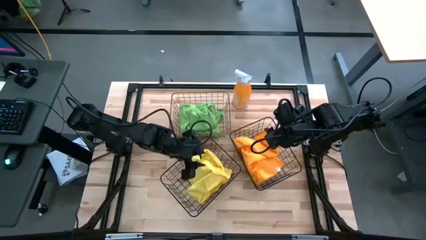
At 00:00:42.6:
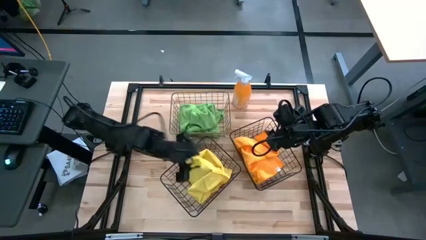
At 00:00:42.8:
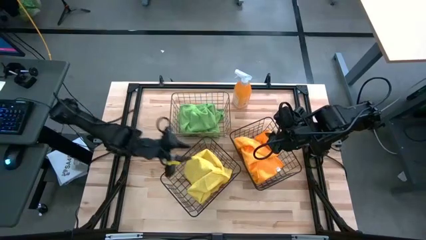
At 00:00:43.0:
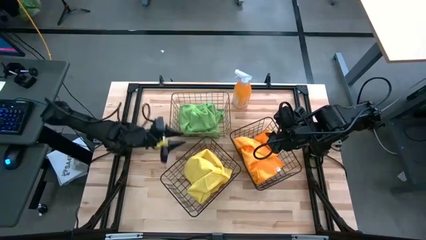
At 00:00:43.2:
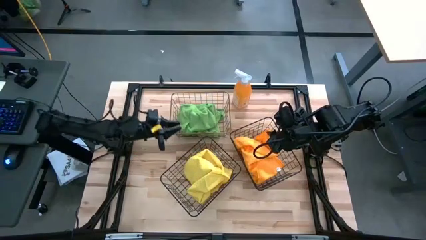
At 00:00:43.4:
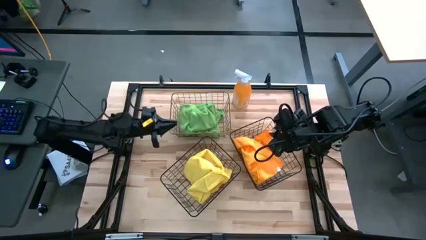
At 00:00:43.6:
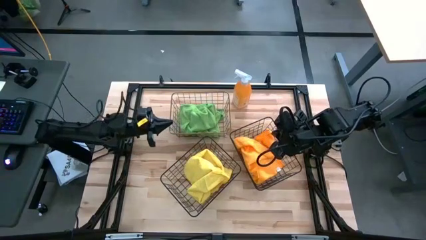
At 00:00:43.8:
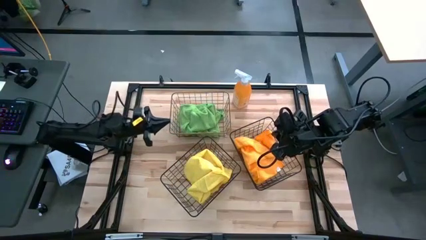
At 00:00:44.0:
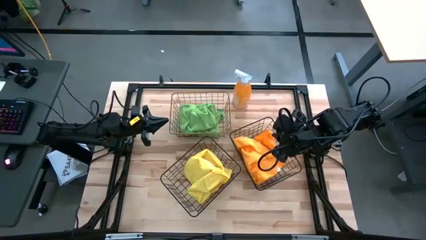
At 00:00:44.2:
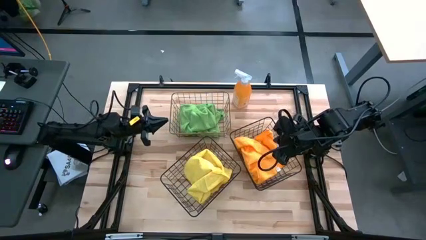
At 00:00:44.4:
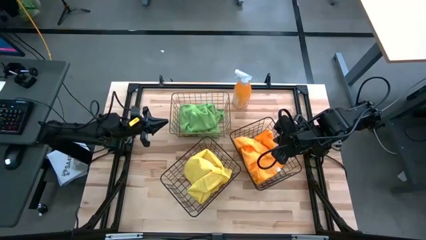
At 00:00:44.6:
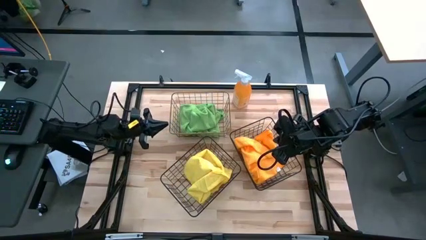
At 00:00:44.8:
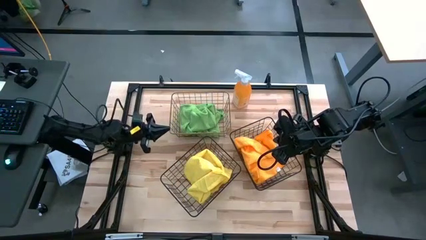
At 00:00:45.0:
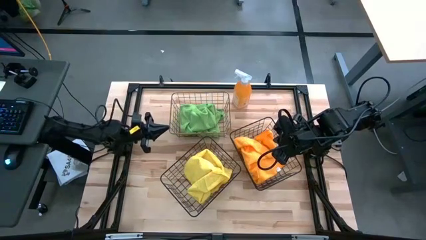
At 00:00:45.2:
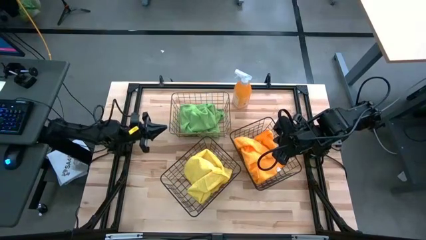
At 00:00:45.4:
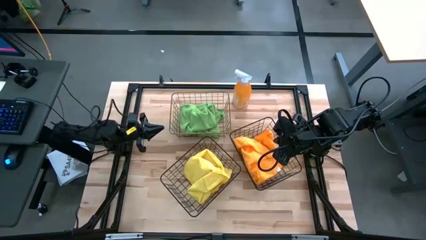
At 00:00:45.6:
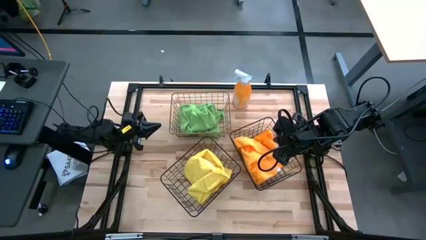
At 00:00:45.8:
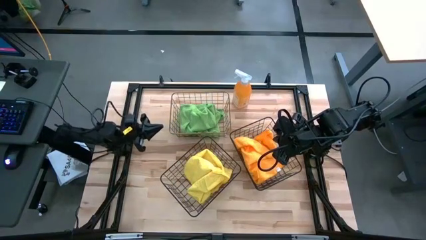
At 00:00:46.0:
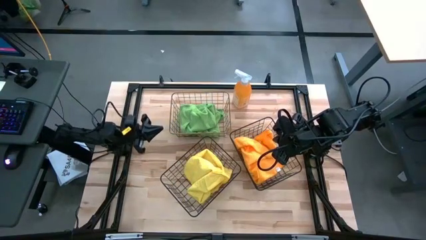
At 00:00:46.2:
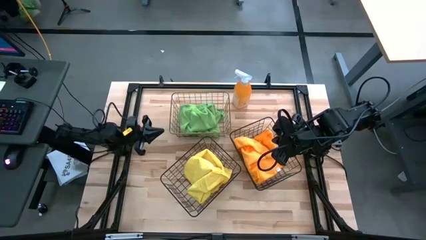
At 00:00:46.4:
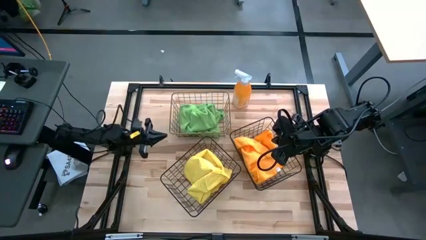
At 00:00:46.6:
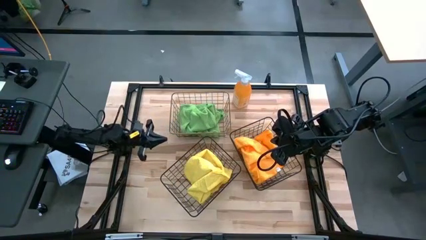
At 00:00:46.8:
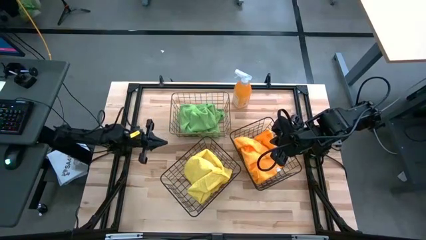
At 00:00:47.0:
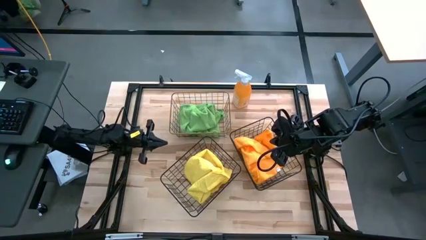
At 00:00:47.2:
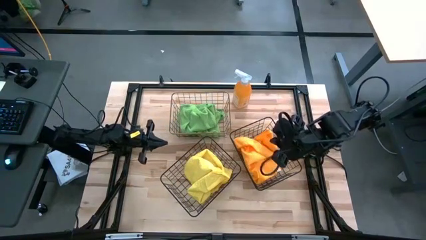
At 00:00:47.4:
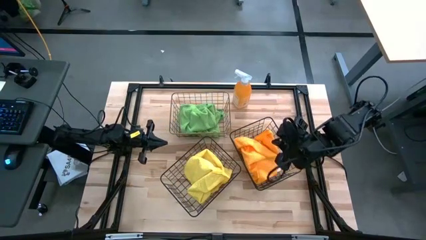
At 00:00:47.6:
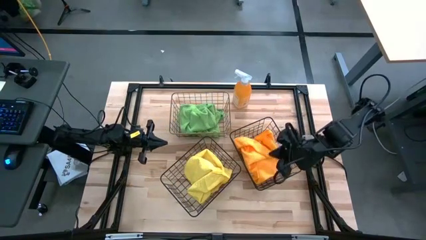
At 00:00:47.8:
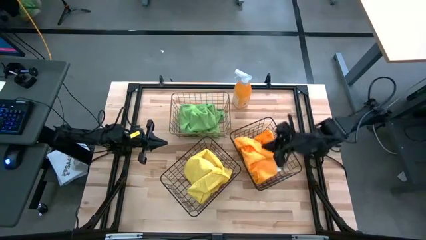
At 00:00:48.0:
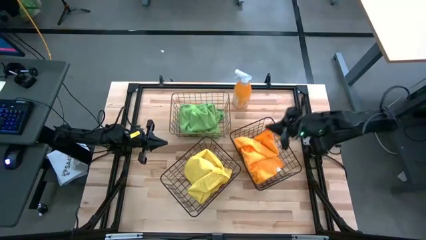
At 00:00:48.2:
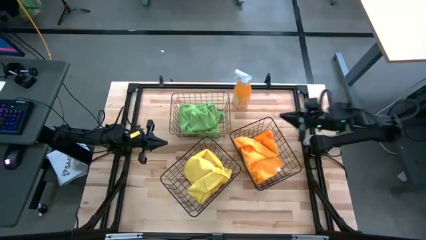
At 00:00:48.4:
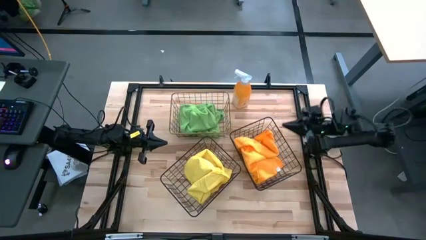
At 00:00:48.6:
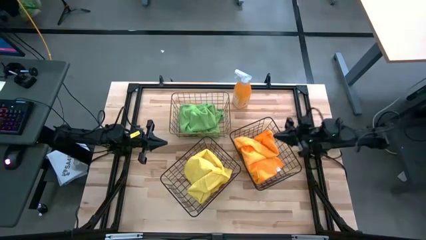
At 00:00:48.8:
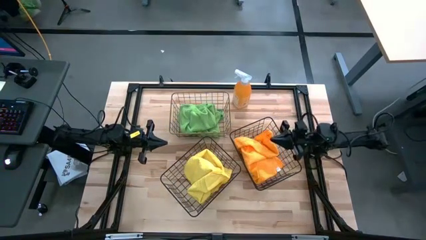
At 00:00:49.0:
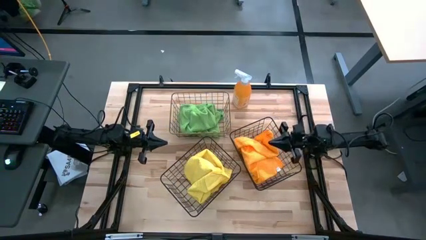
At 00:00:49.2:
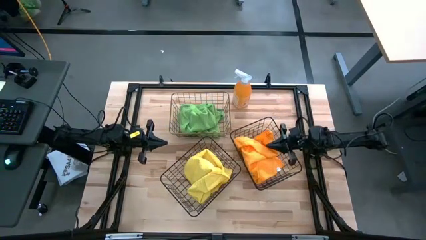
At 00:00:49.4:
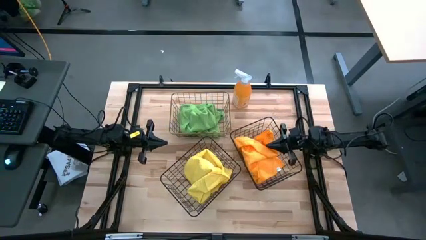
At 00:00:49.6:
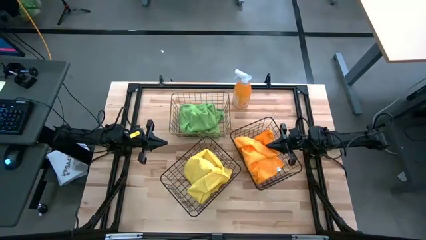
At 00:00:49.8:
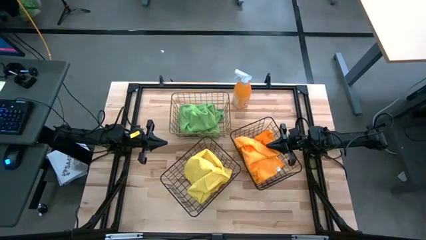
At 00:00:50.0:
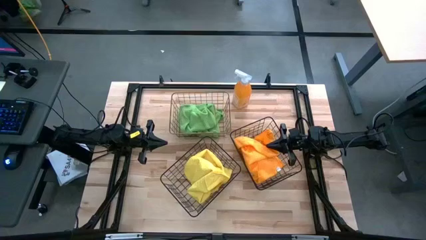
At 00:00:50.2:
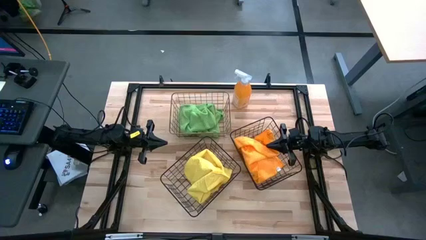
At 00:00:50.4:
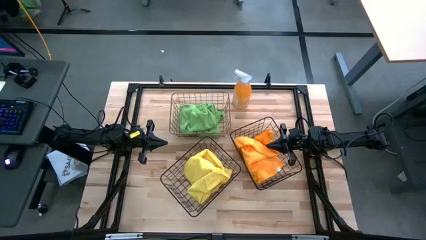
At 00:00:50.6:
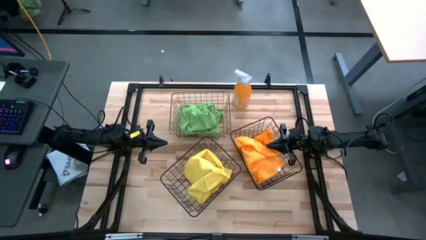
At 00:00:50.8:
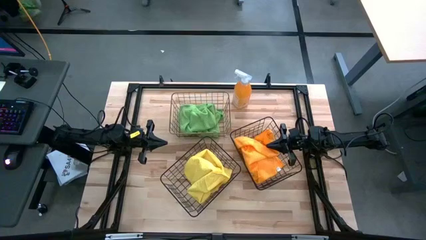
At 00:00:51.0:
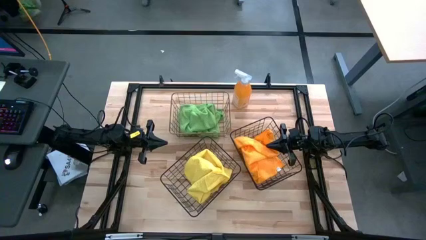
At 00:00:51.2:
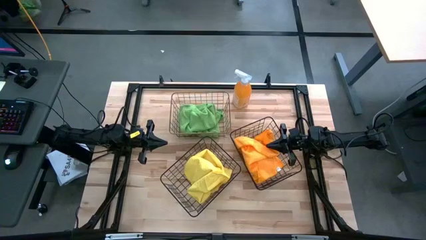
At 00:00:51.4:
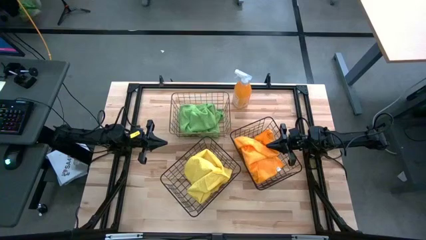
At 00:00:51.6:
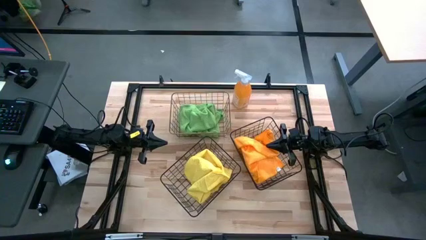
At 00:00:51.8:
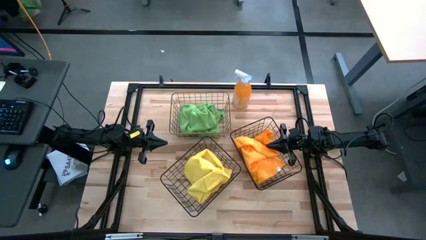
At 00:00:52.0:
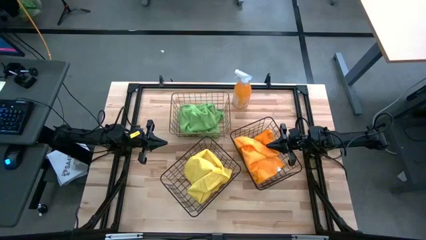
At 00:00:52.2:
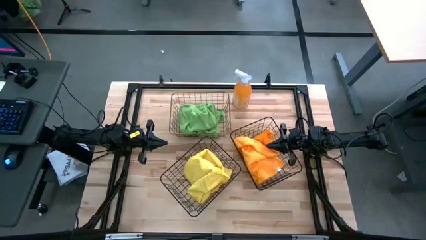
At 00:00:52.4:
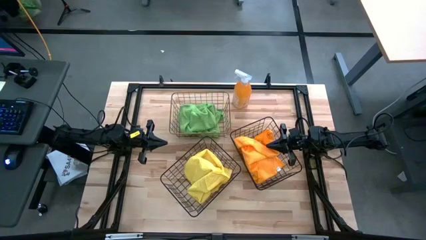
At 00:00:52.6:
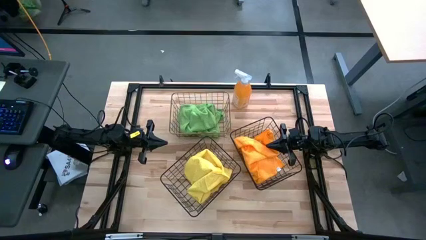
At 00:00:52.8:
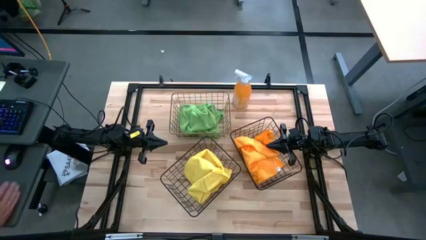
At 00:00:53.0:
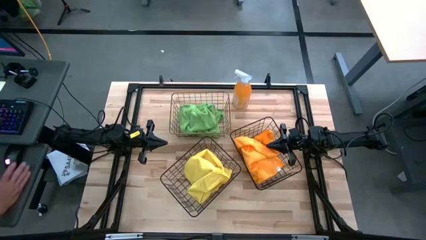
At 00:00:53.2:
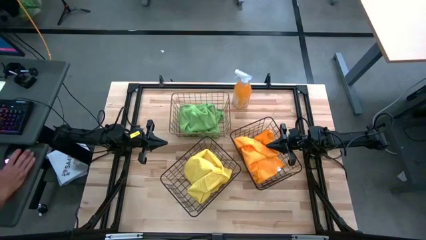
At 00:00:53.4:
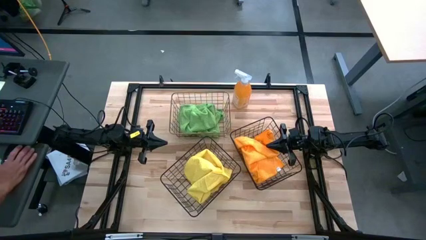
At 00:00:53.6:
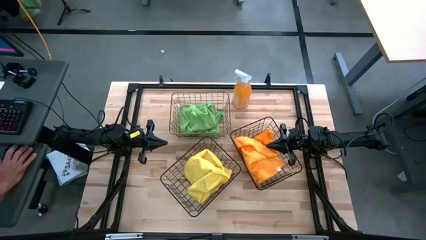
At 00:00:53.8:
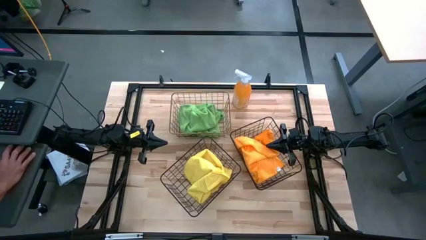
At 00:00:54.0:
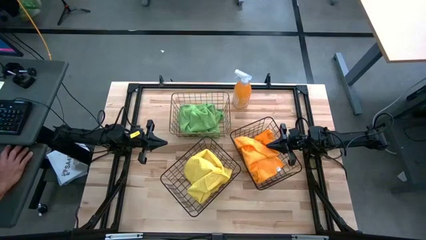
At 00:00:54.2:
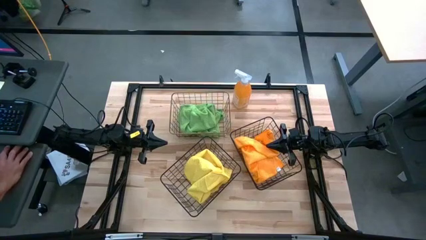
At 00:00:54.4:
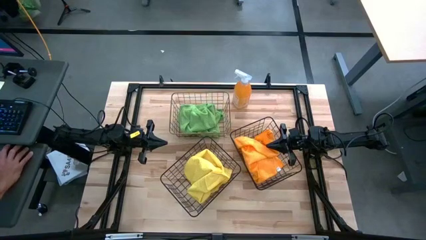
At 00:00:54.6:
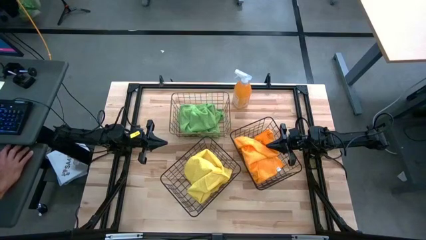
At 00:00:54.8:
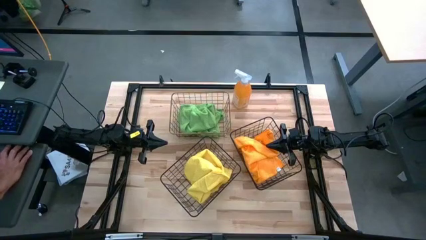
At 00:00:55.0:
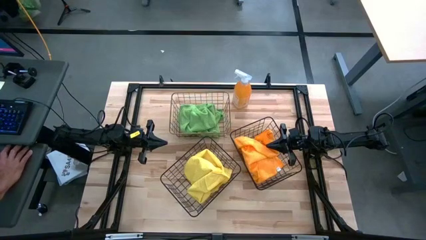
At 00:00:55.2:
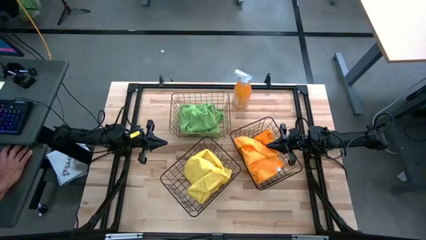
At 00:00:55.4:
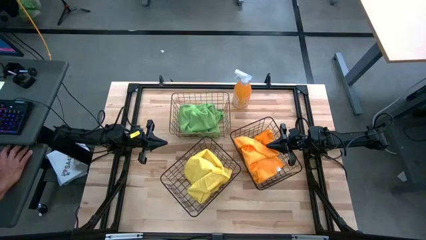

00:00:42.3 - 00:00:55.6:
Task: Sort microfiber towel by color & place in baskets
Return to Home Position
